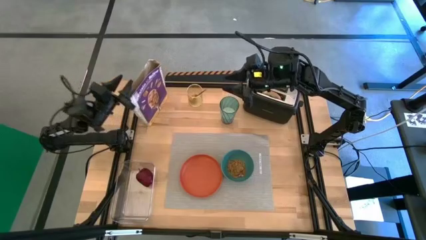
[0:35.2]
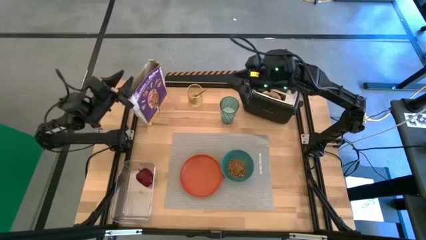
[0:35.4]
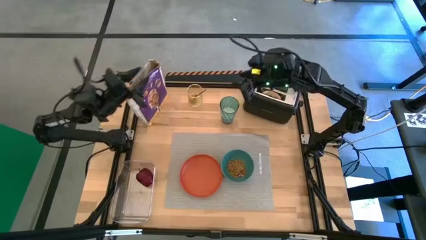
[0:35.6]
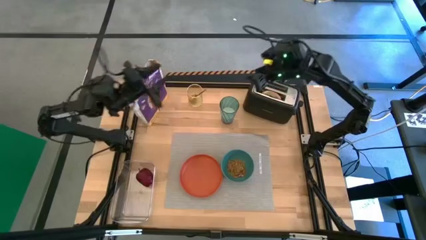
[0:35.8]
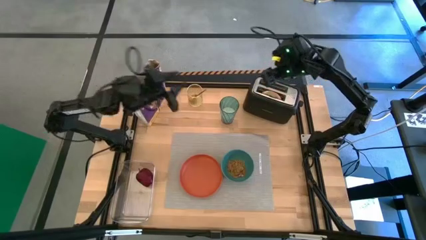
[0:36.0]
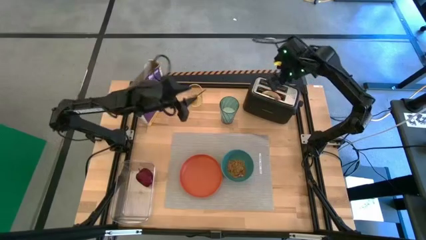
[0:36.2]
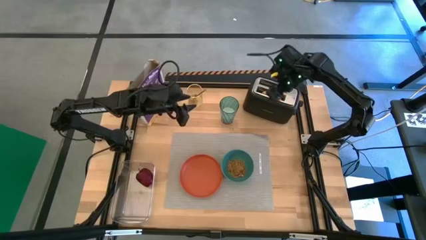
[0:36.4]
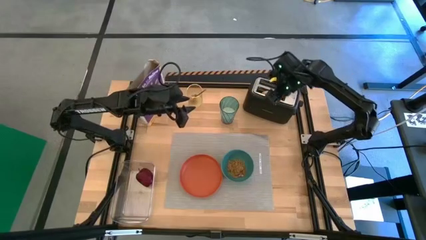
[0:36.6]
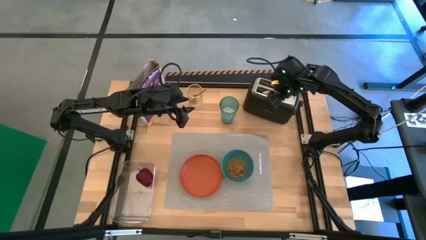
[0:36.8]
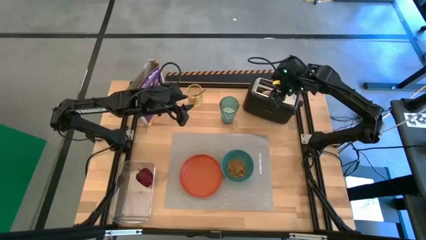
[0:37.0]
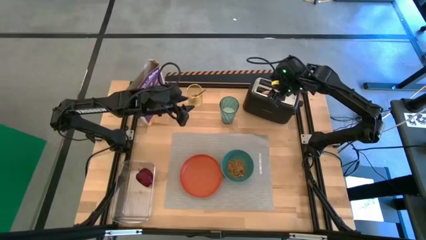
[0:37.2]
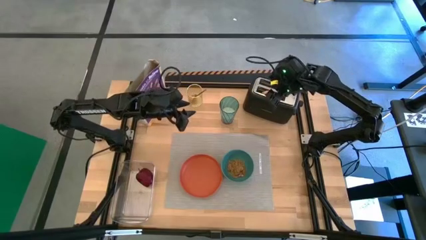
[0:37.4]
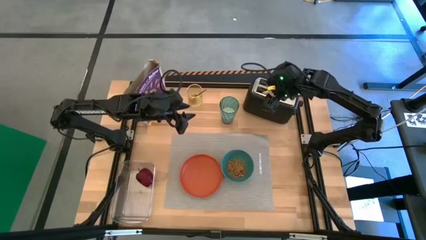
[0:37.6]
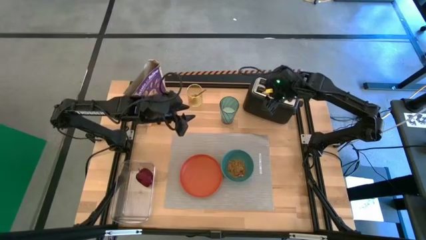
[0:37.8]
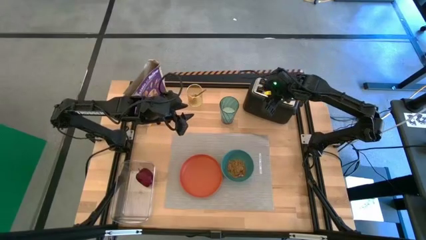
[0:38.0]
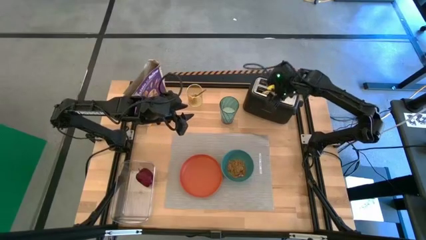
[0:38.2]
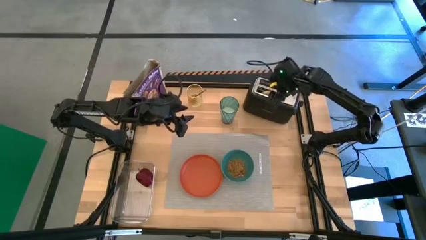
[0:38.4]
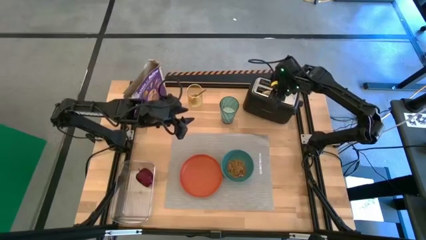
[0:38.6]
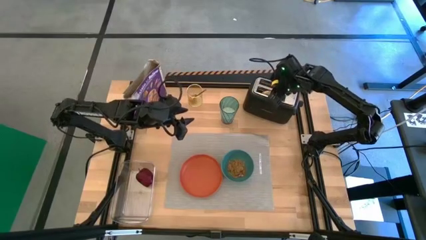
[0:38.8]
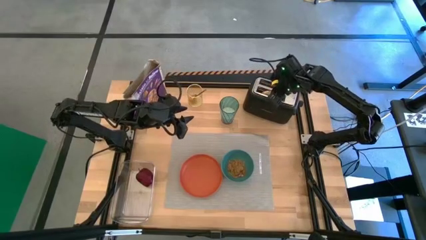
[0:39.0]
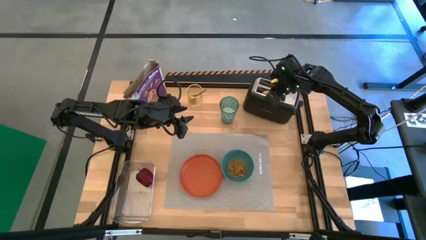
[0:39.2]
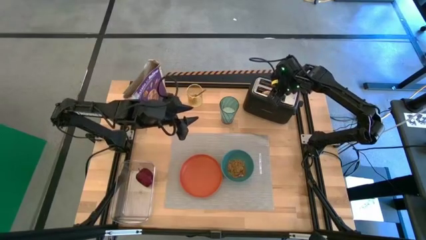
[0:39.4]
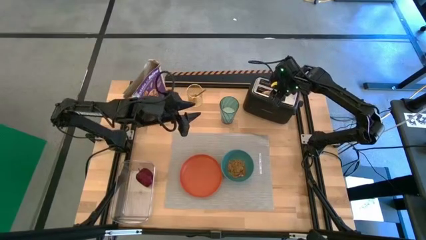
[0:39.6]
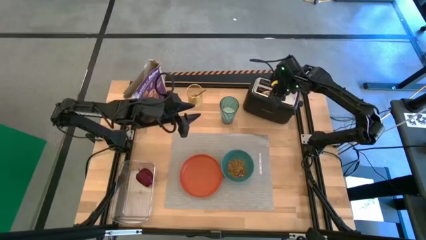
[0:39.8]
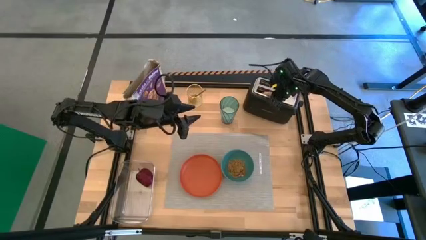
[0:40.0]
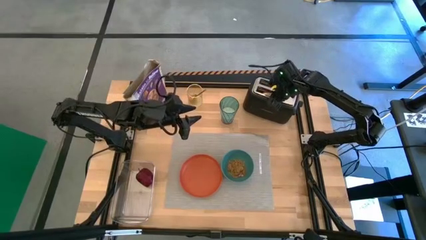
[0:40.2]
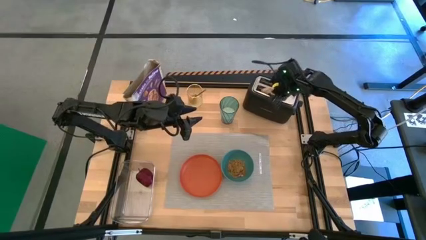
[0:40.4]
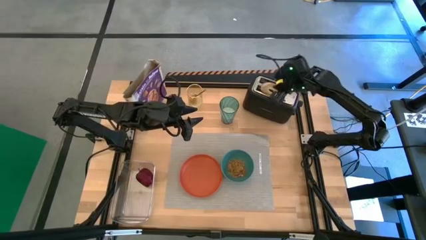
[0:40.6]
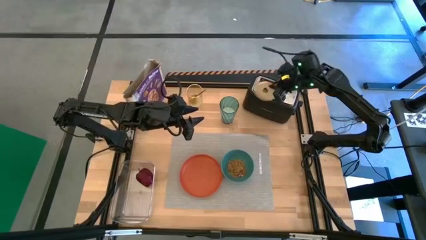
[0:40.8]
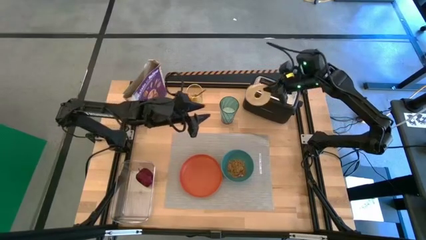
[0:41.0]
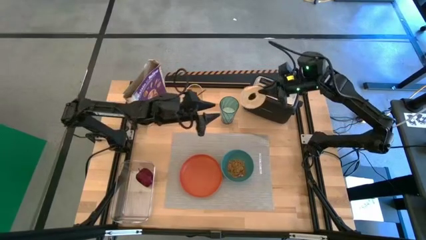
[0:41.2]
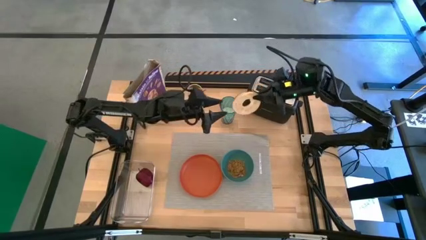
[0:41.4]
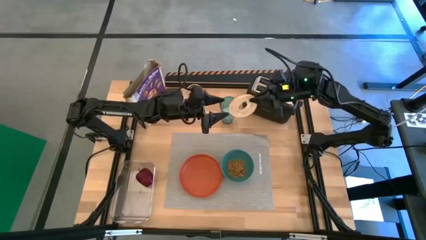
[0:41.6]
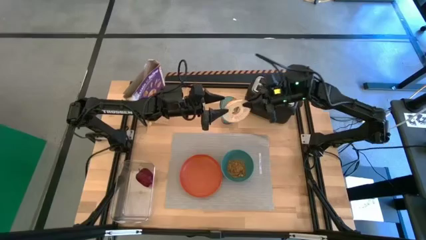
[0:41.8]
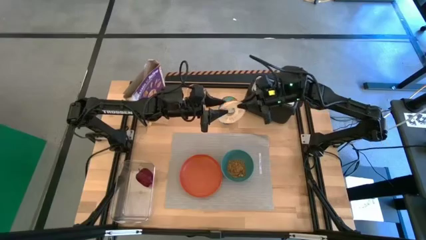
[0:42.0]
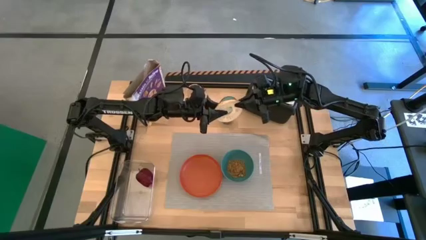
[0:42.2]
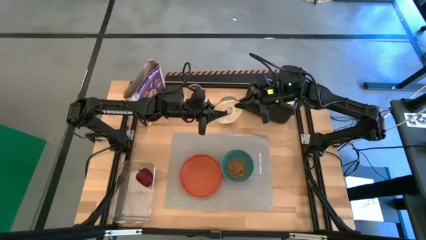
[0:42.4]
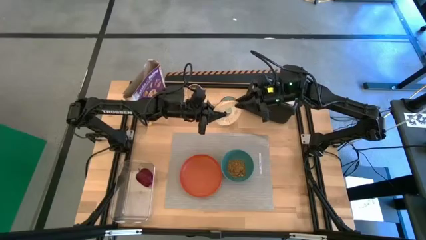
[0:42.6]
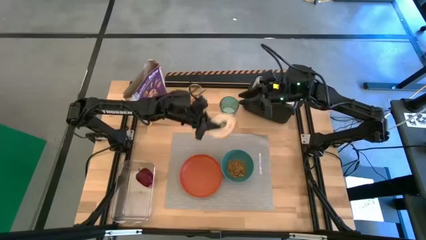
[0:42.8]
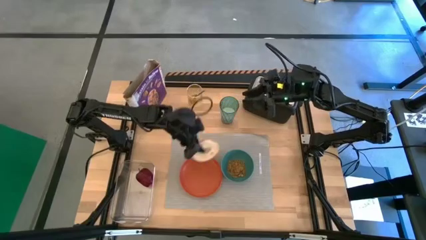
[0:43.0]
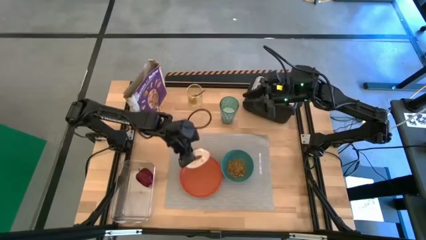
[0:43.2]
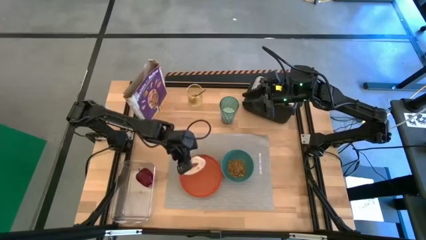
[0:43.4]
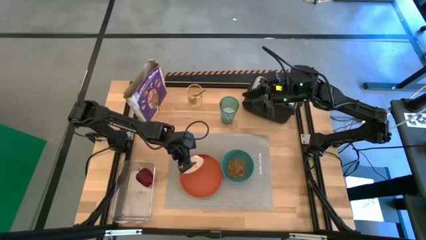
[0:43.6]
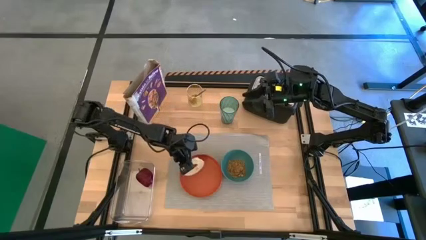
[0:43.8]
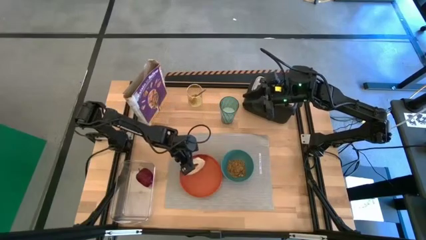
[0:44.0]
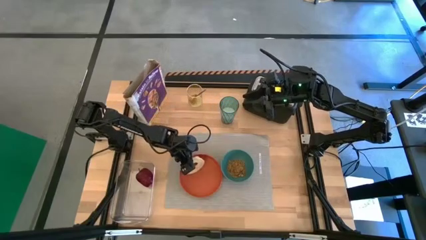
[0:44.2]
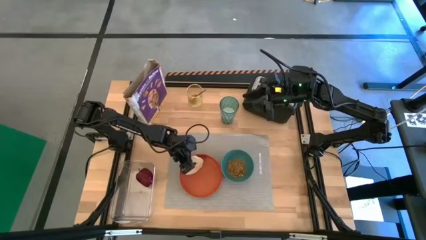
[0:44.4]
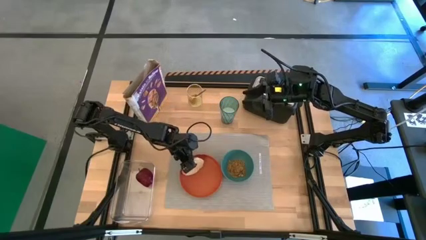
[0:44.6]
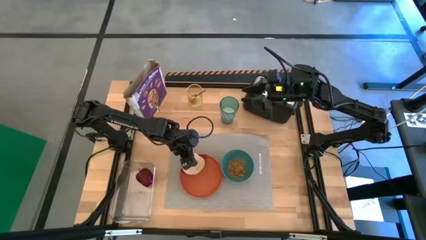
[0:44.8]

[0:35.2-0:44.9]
Task: Arrange a breakfast setting
Put the toasted bagel on the plate from the toaster
